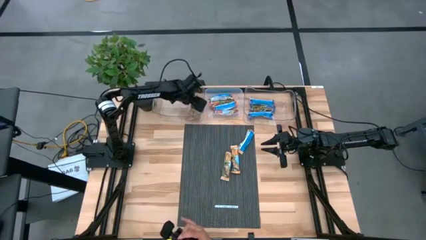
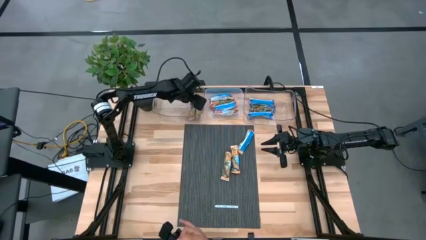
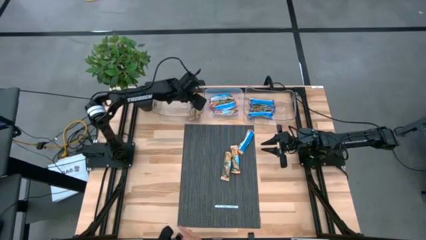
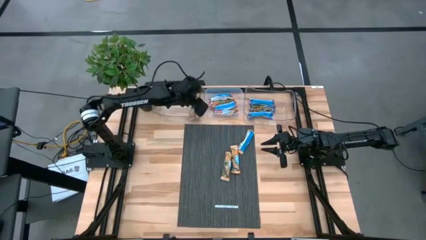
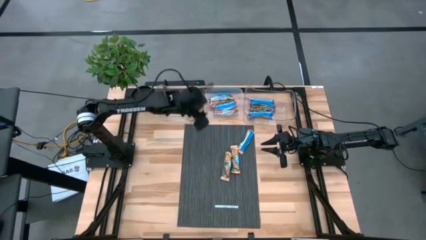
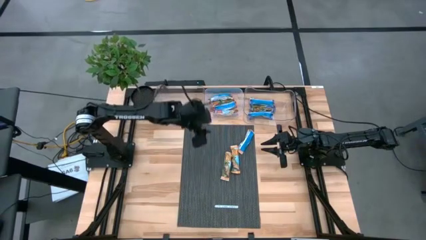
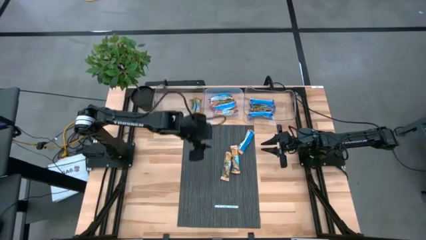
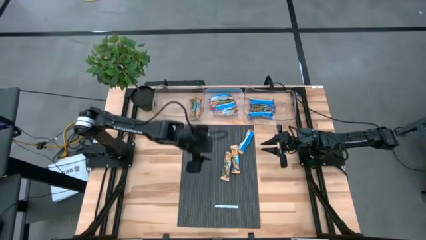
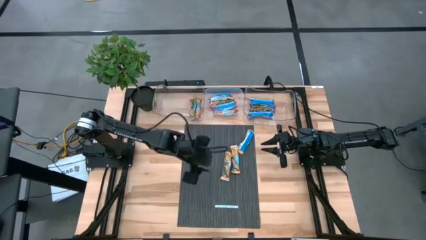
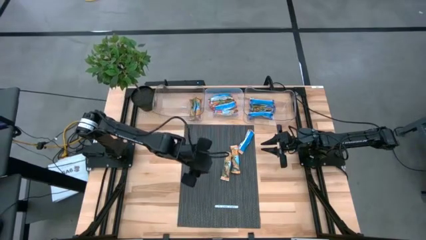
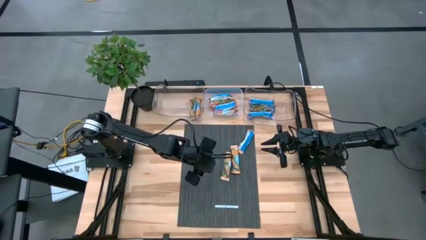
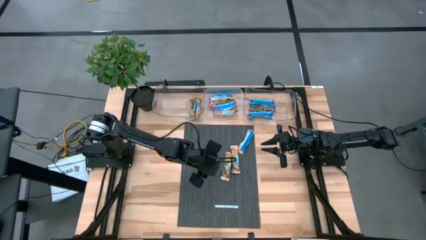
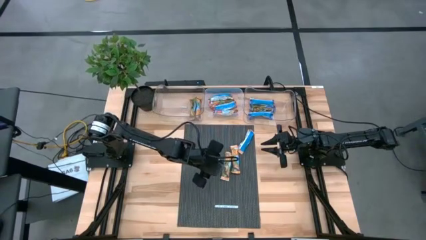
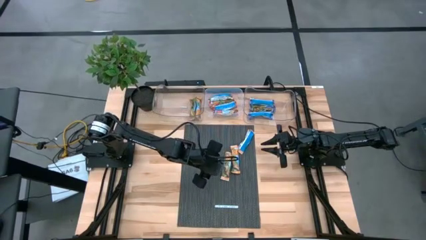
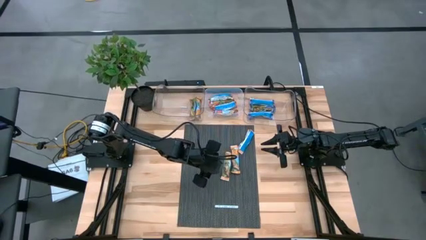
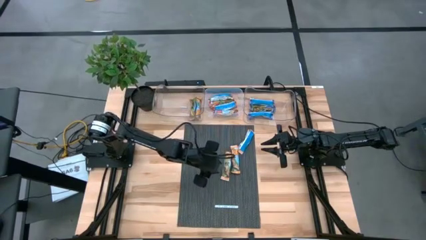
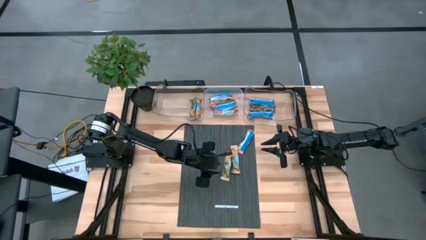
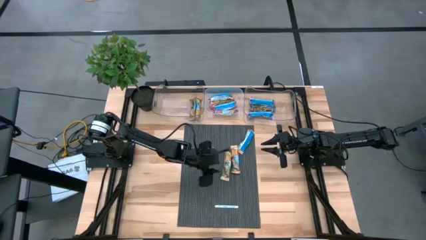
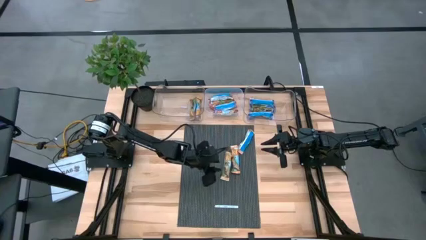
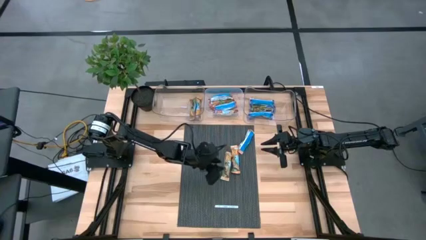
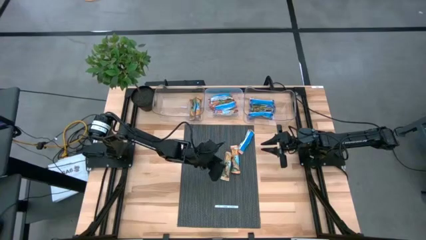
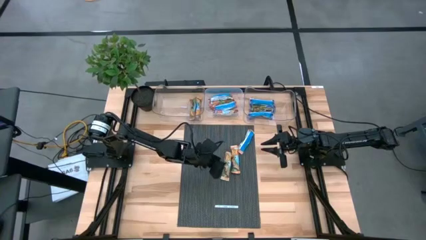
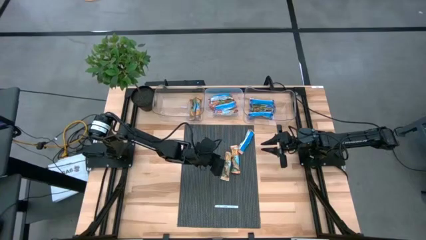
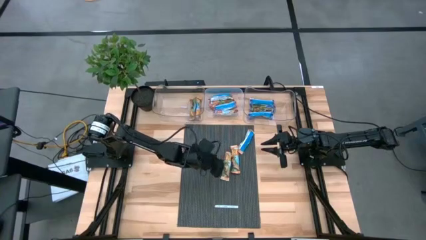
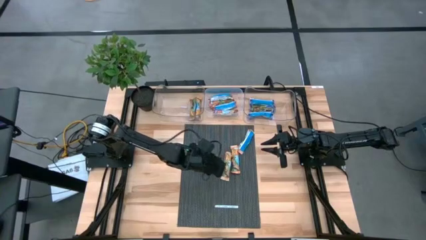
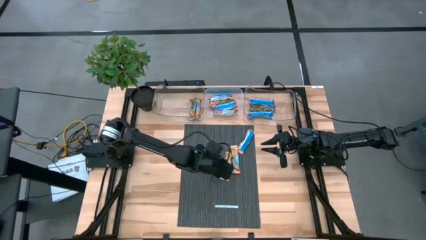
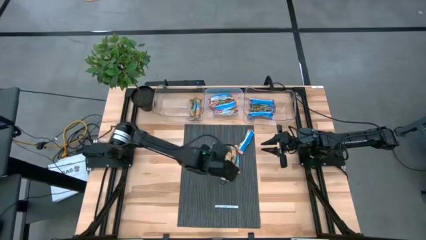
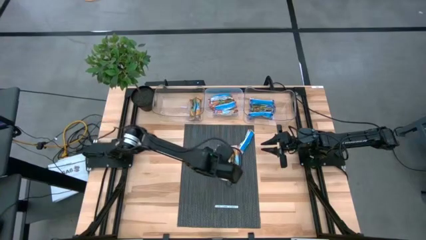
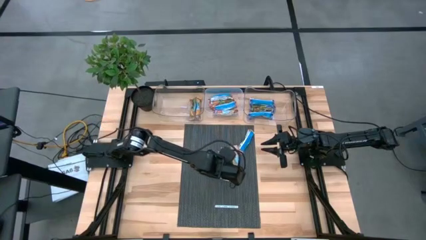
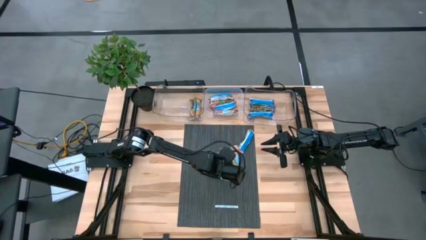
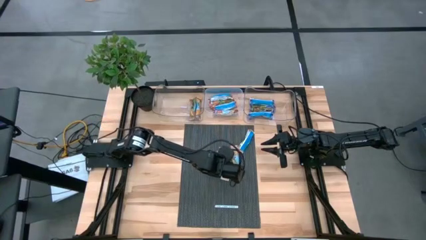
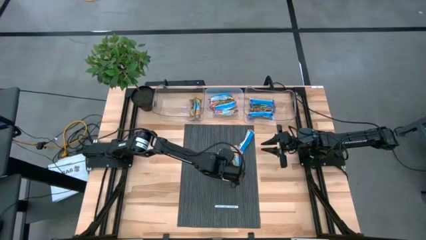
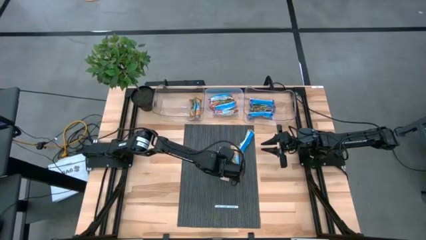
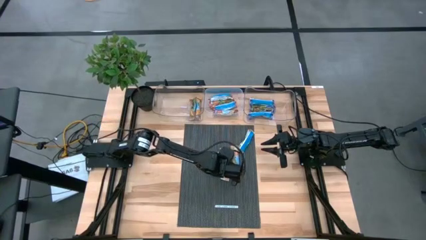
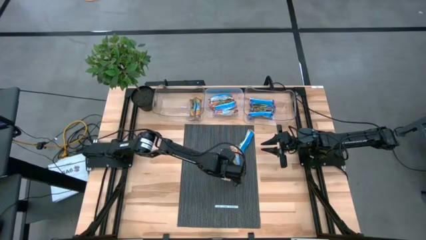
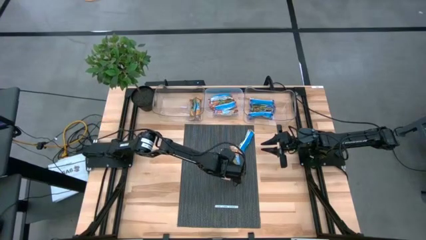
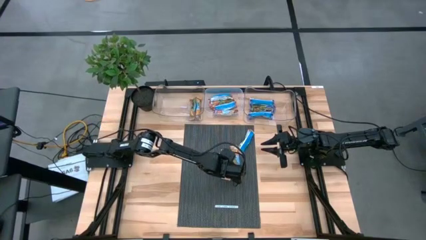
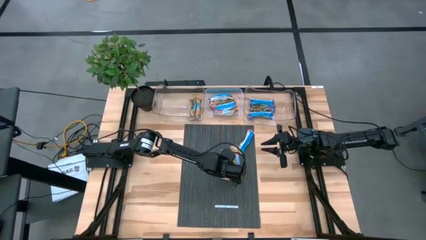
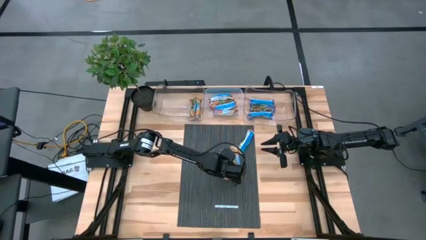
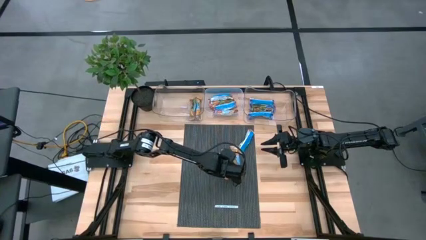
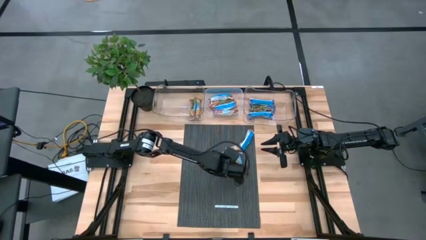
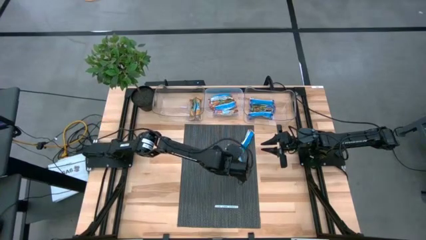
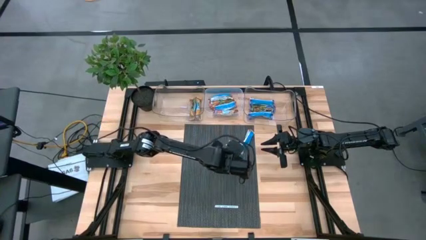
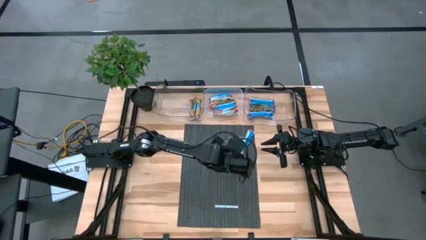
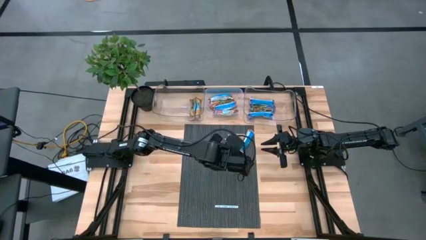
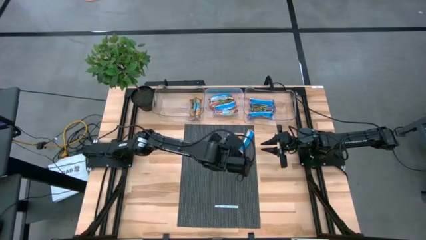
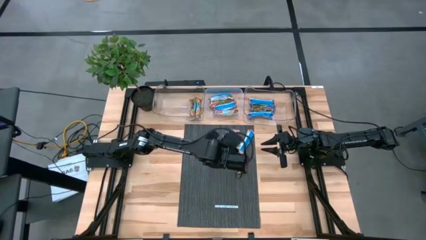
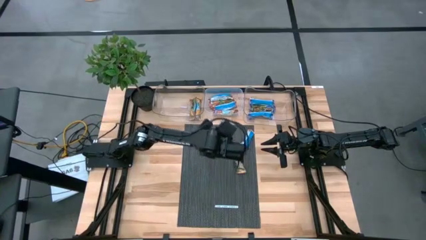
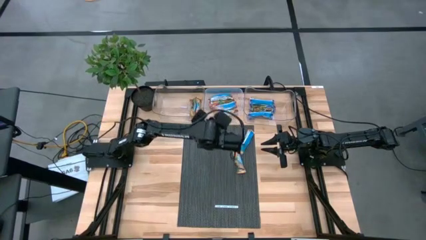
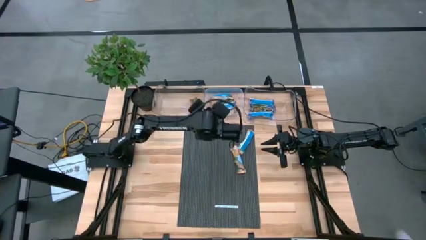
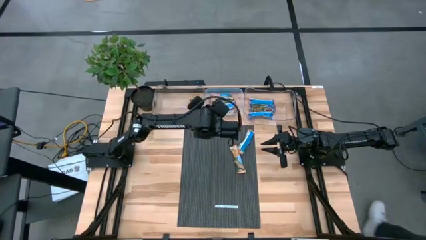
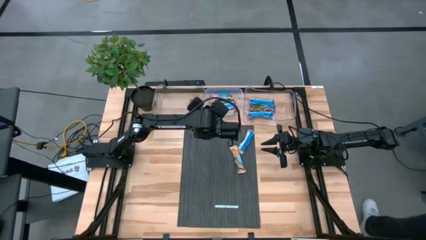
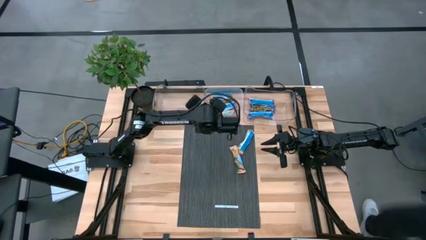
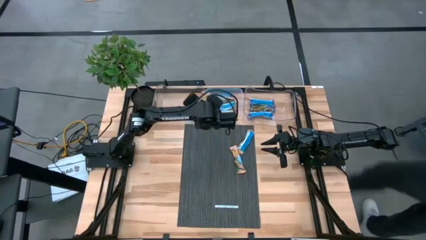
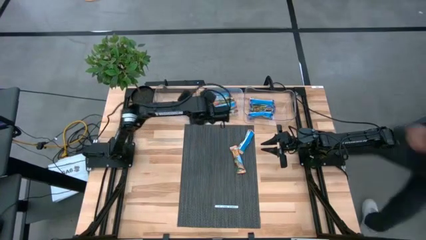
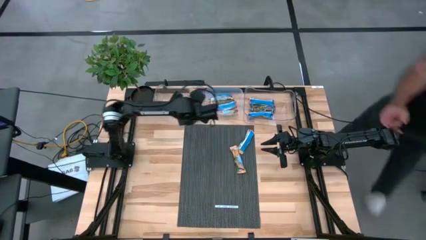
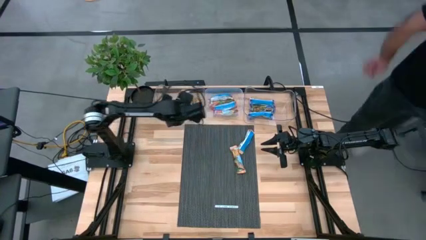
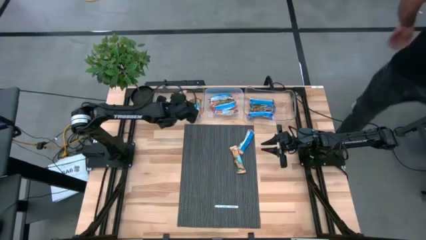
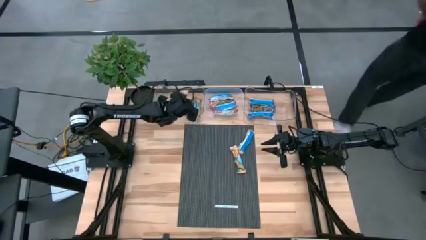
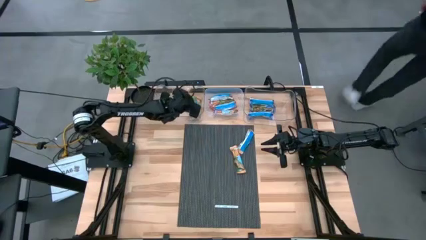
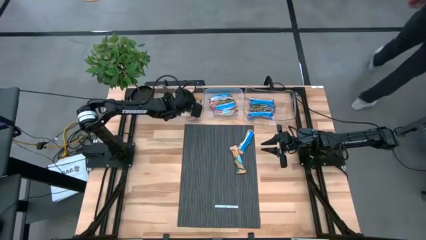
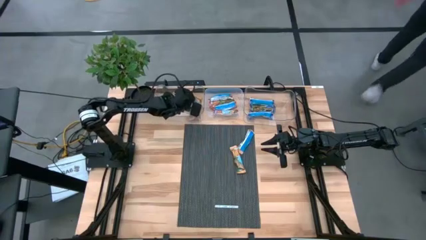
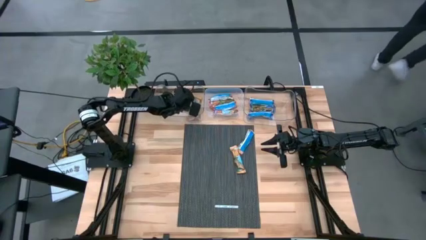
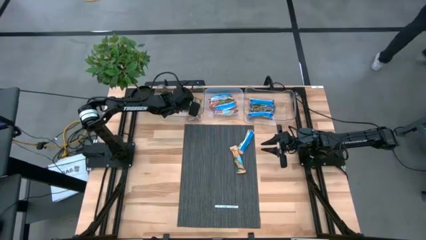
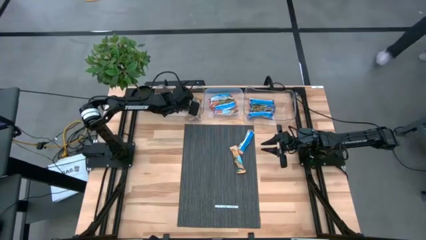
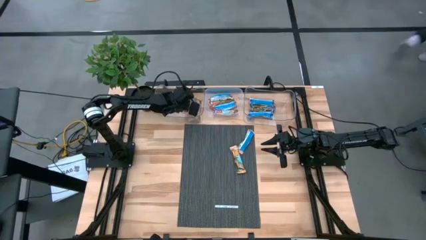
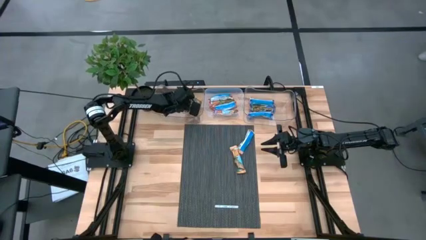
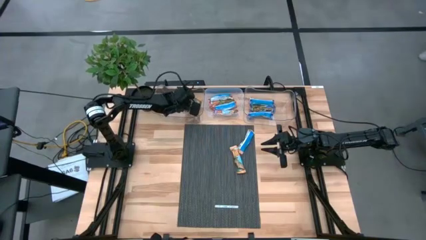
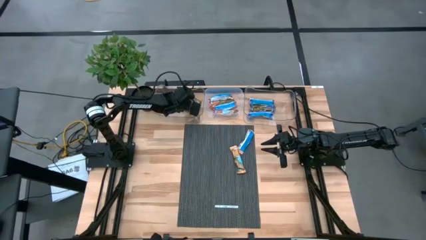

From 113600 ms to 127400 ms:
Task: Pick and place Granola Bars by type
Put the bottom left orange granola bar into the left transparent bin

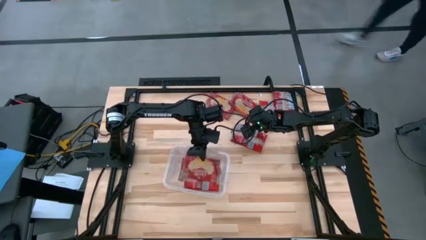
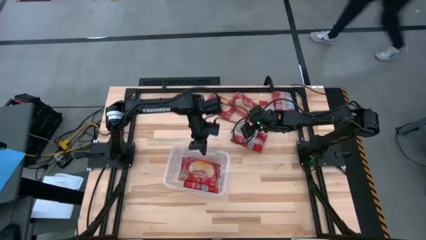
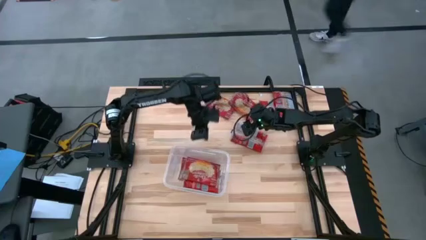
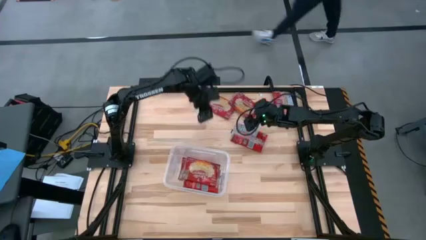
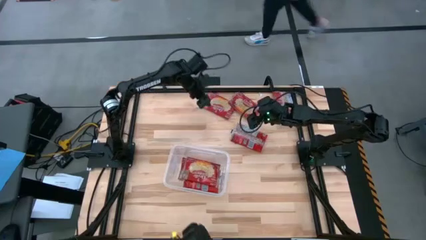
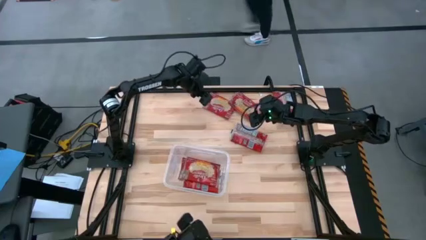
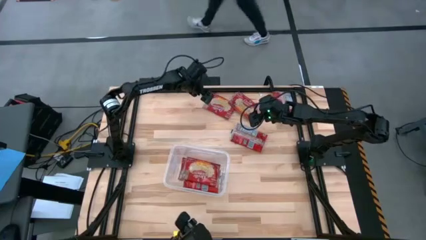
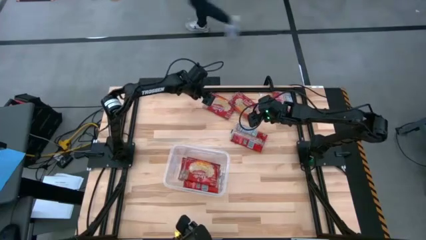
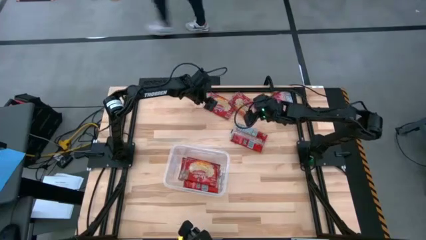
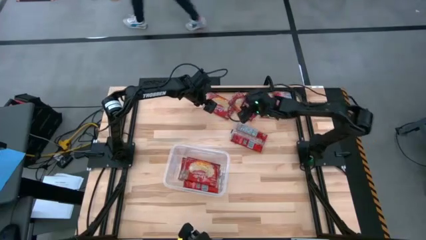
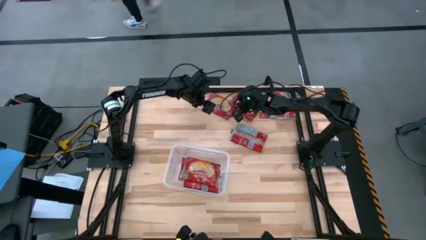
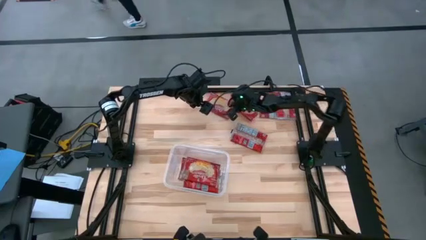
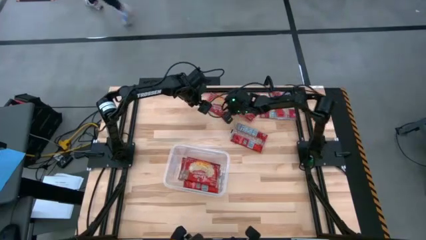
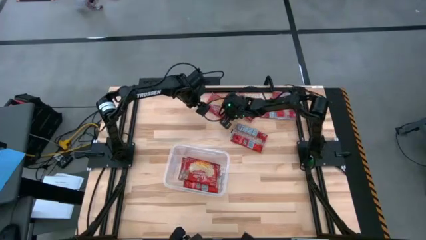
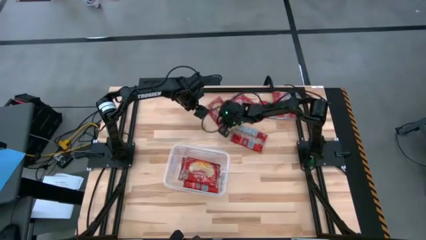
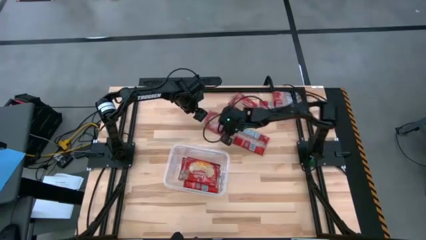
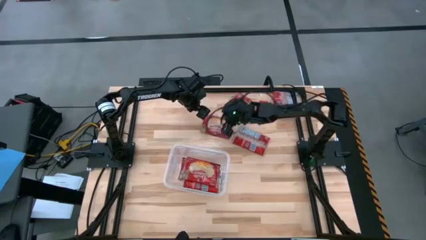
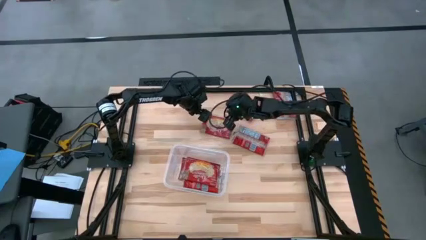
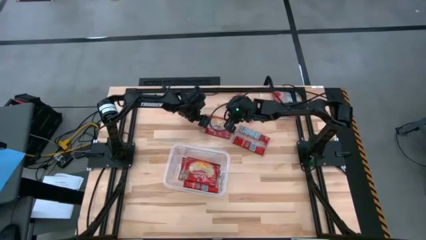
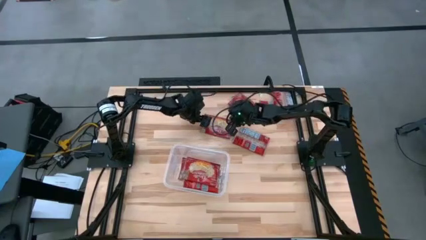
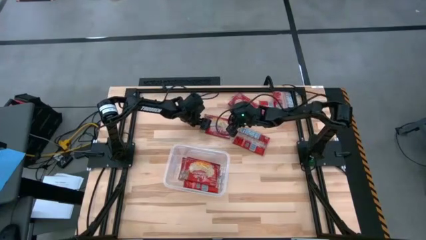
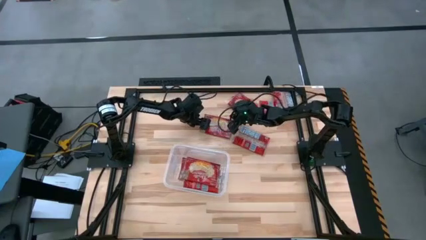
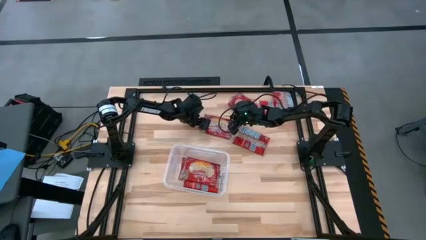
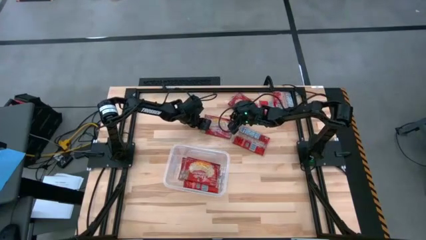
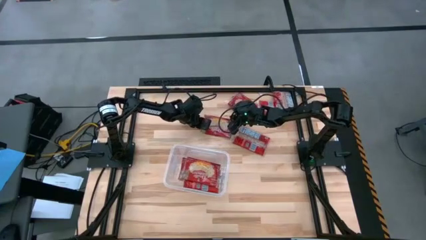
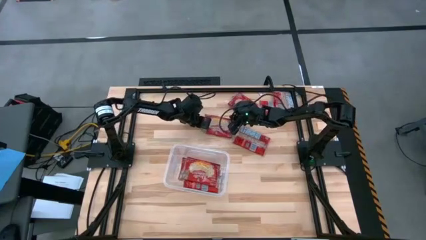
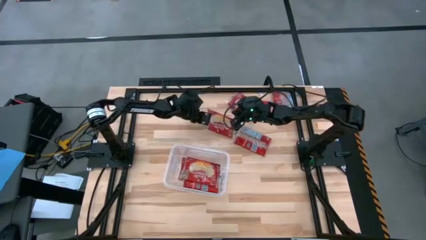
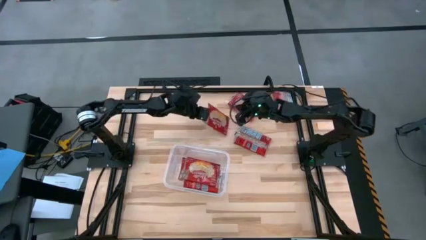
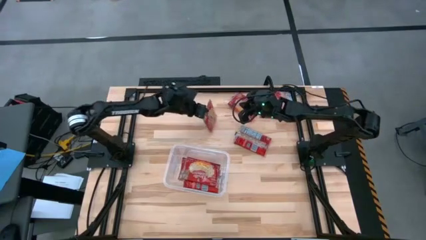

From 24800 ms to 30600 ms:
Task: Sort popcorn bags into baskets
Put the red popcorn bag into the container
